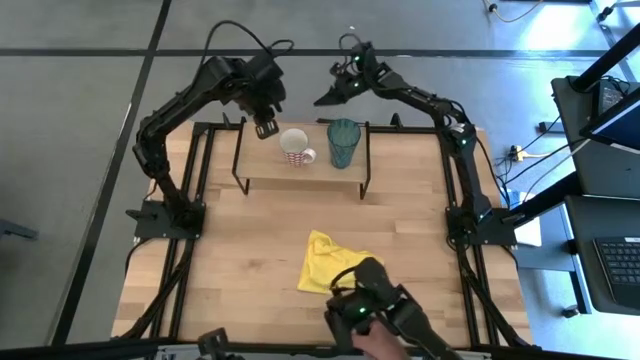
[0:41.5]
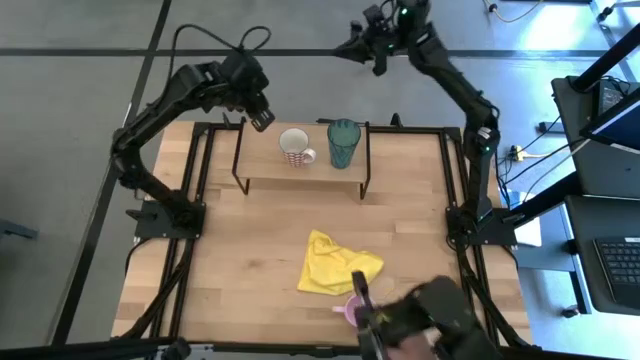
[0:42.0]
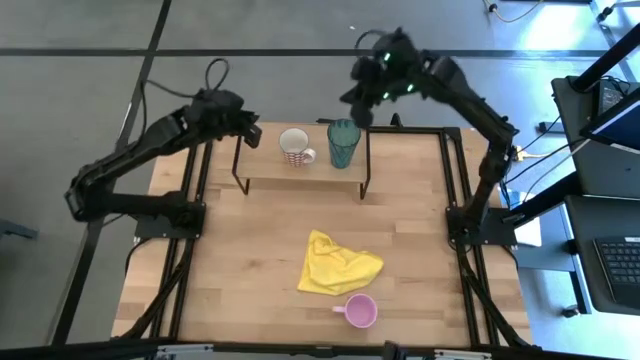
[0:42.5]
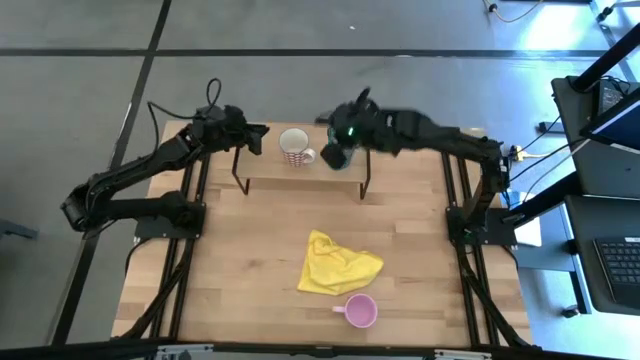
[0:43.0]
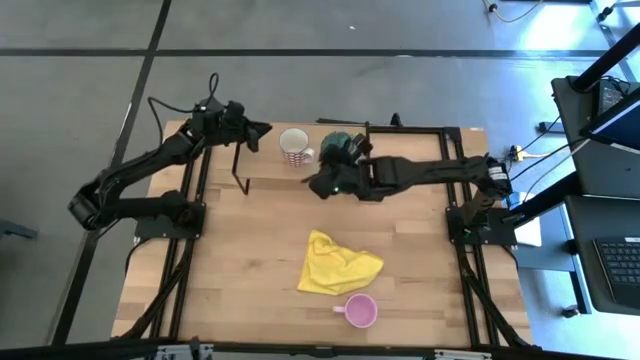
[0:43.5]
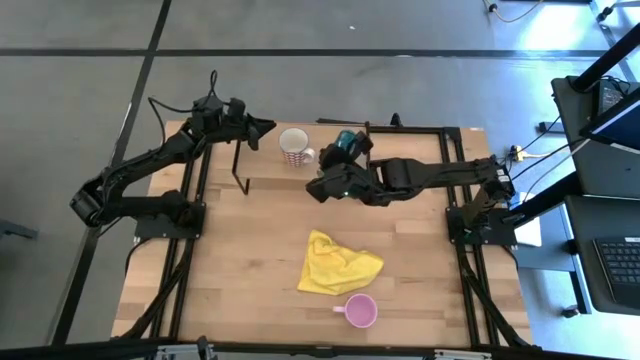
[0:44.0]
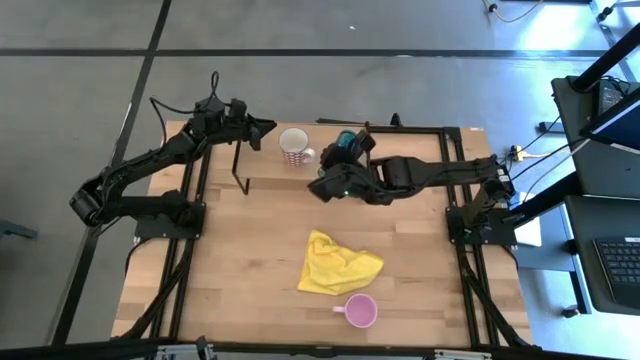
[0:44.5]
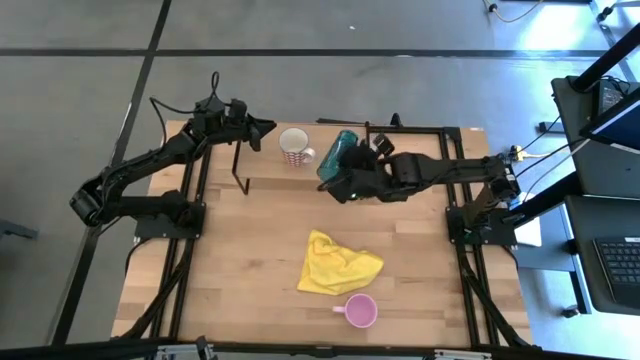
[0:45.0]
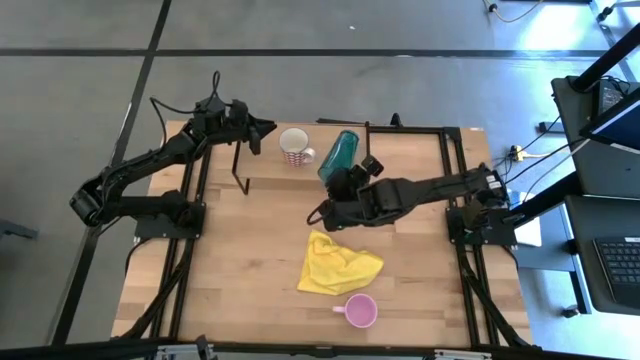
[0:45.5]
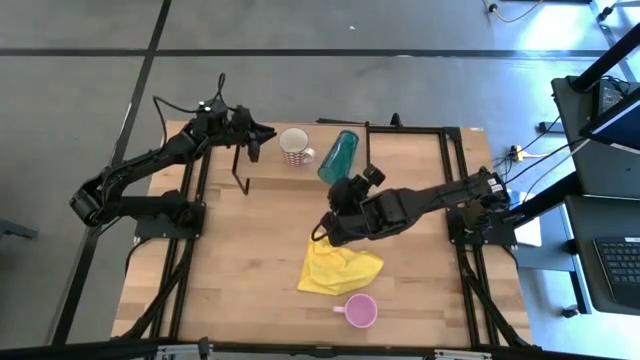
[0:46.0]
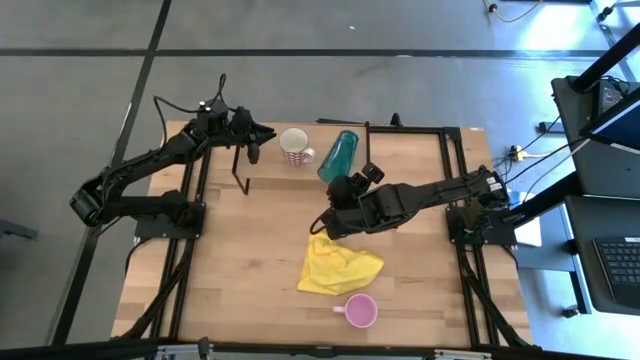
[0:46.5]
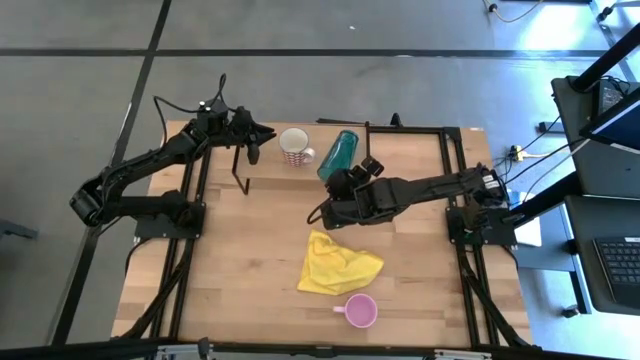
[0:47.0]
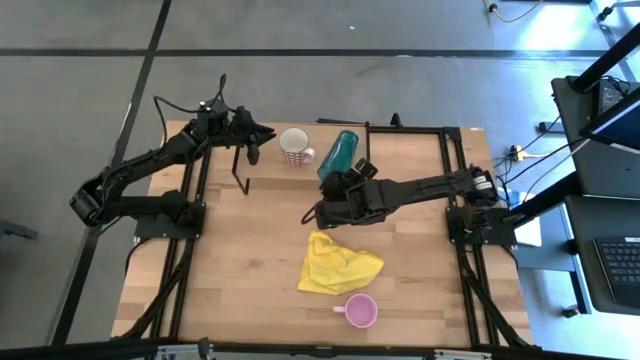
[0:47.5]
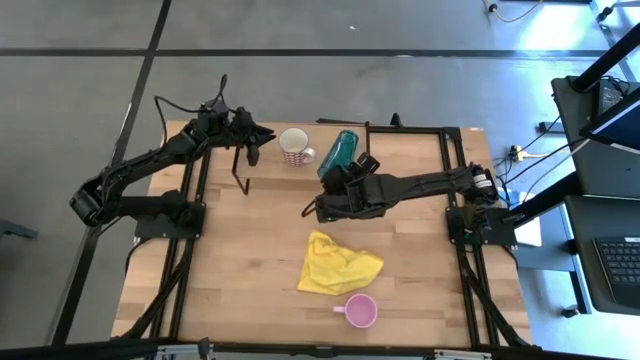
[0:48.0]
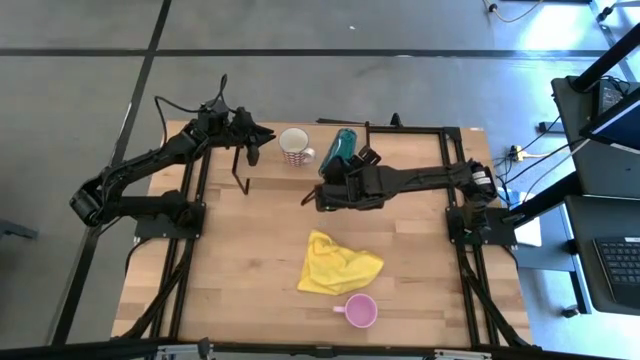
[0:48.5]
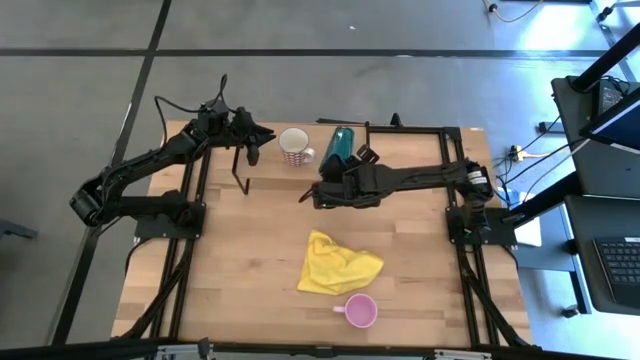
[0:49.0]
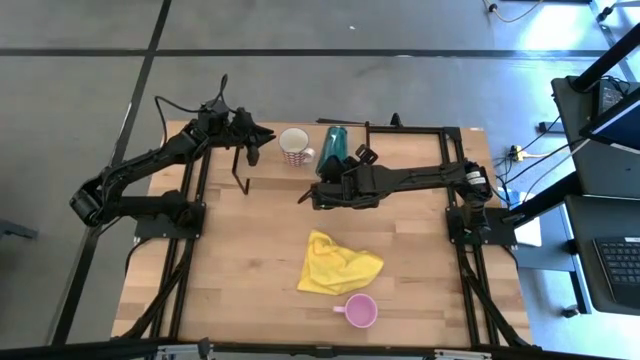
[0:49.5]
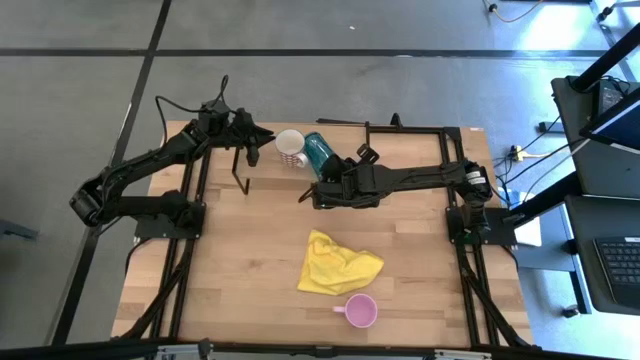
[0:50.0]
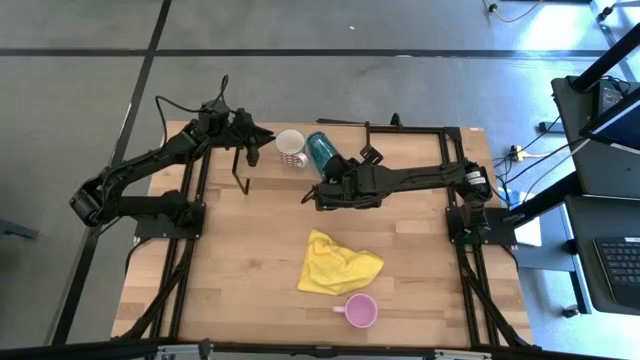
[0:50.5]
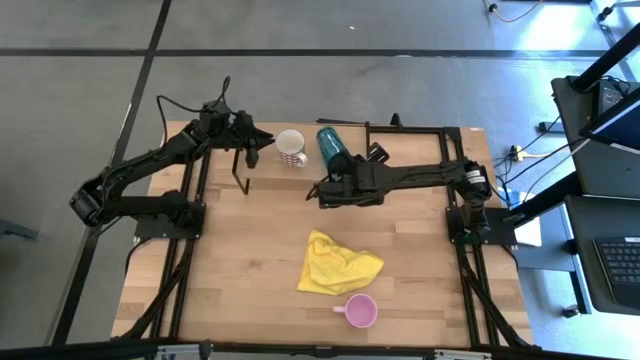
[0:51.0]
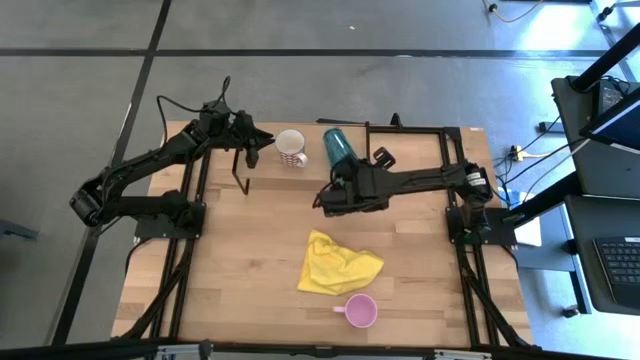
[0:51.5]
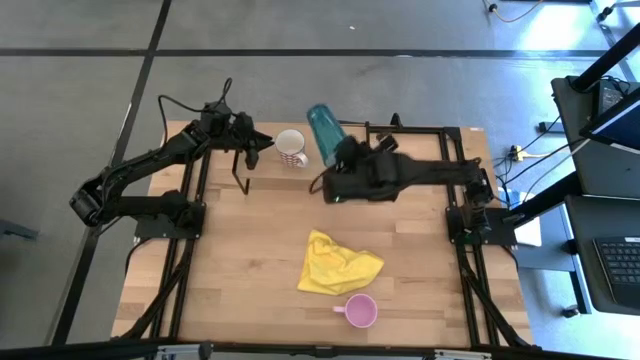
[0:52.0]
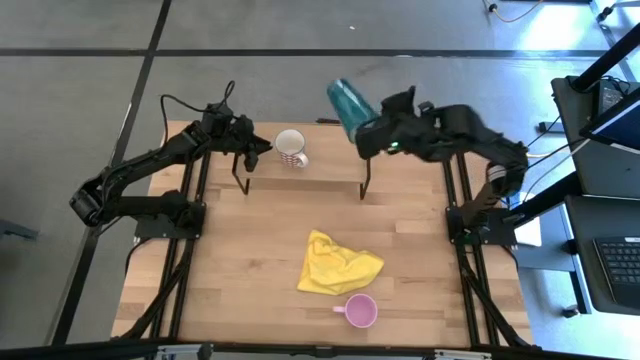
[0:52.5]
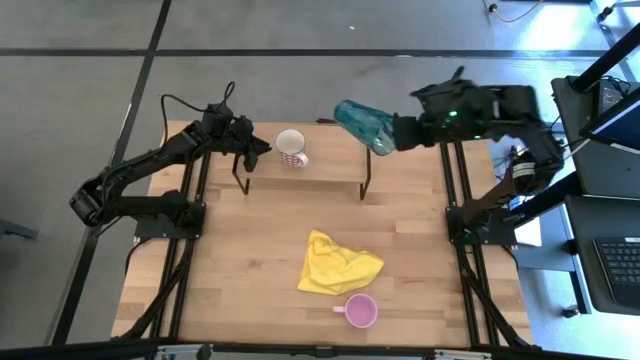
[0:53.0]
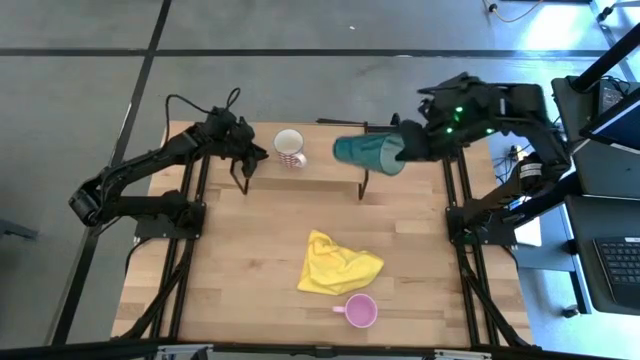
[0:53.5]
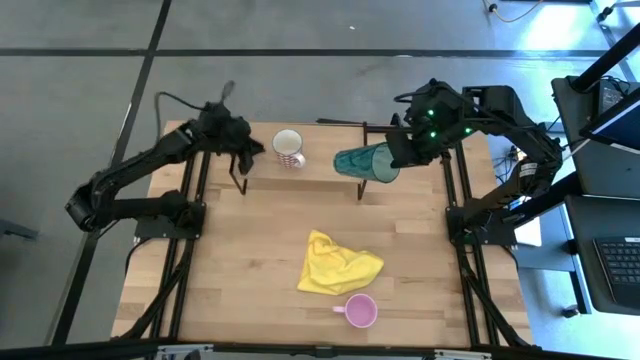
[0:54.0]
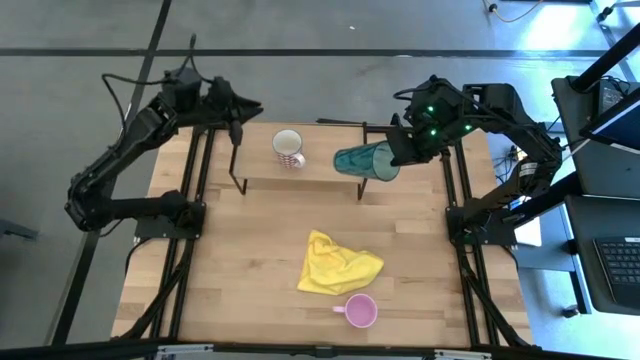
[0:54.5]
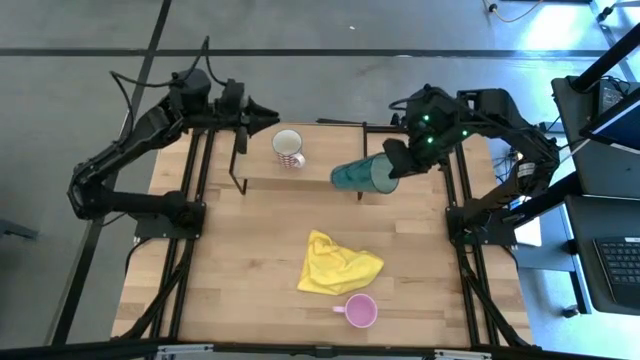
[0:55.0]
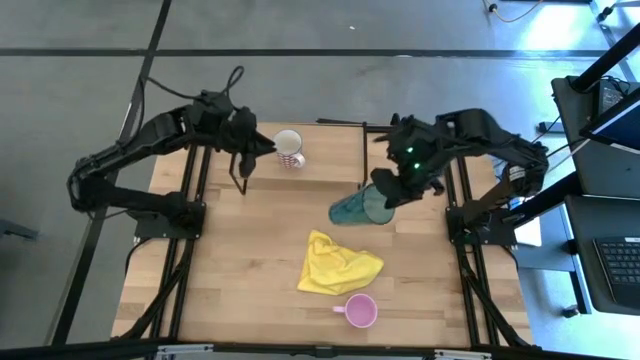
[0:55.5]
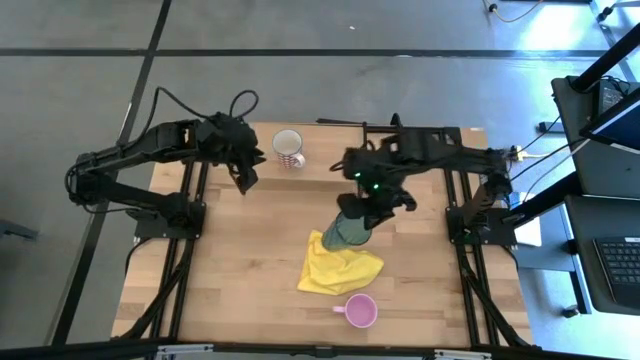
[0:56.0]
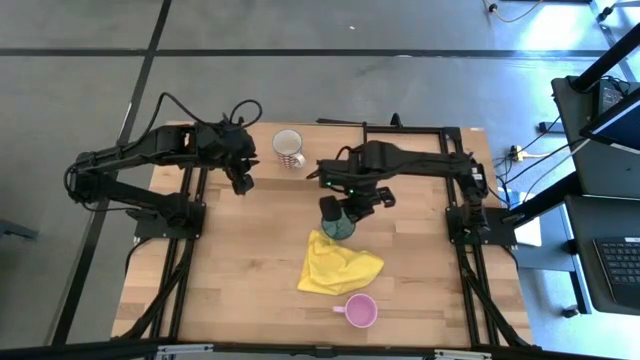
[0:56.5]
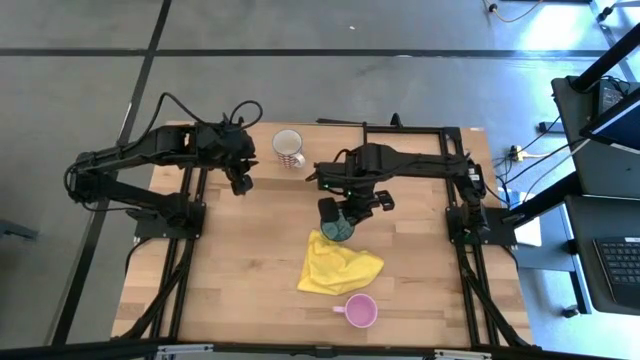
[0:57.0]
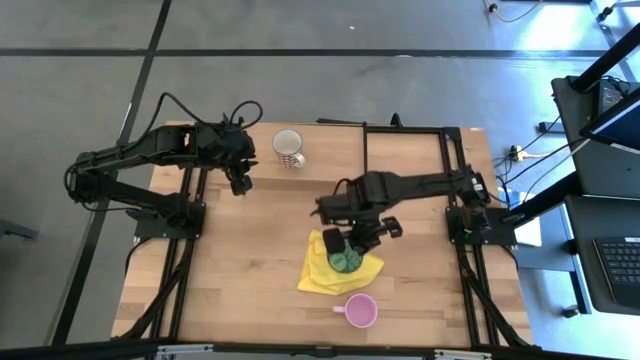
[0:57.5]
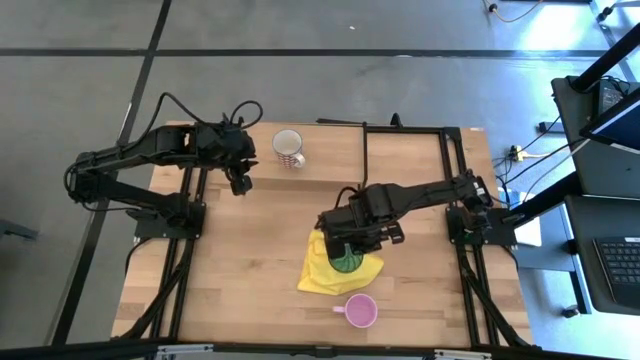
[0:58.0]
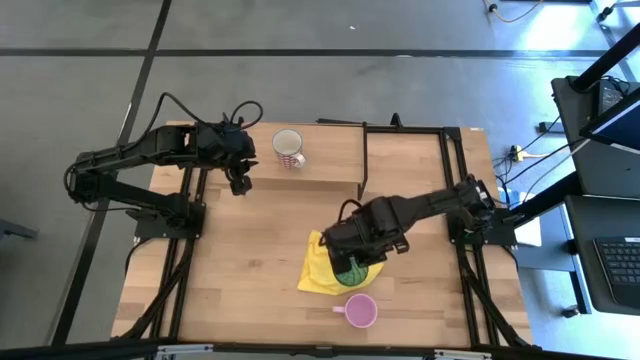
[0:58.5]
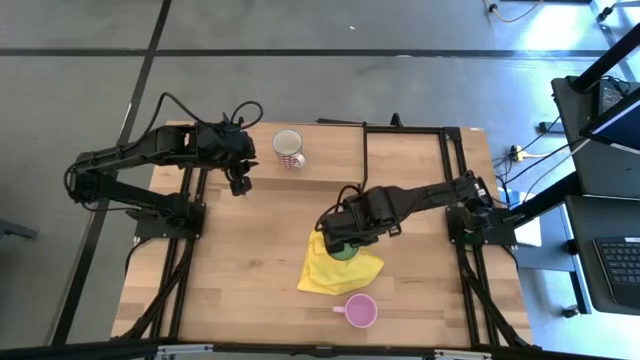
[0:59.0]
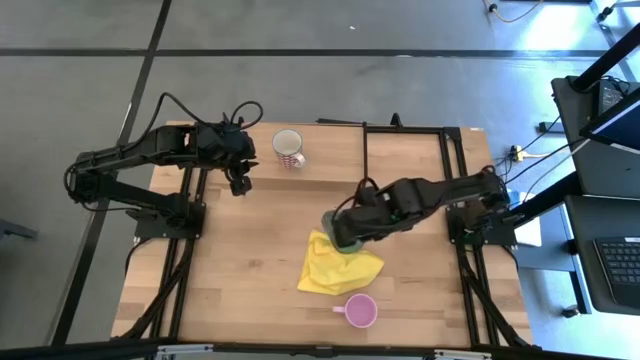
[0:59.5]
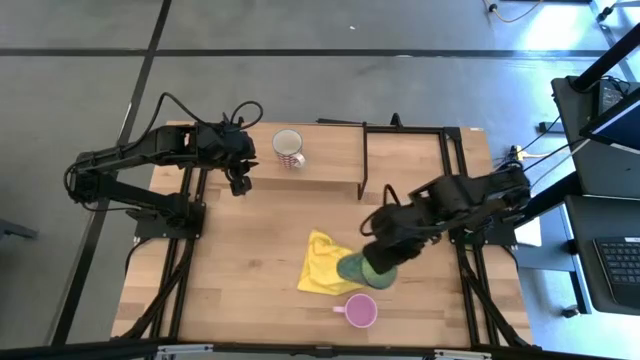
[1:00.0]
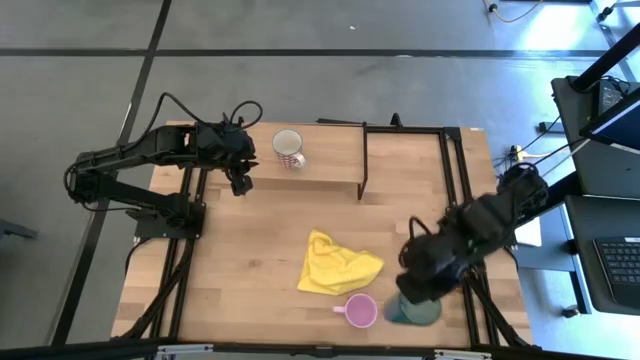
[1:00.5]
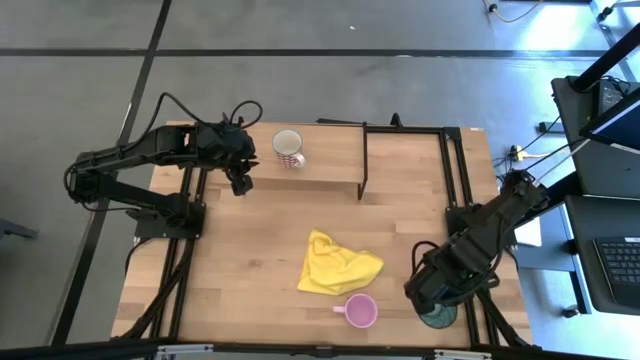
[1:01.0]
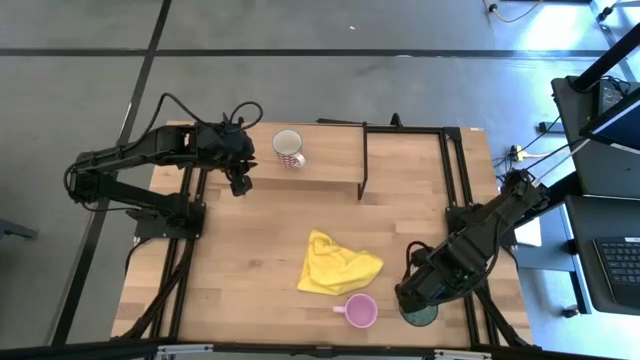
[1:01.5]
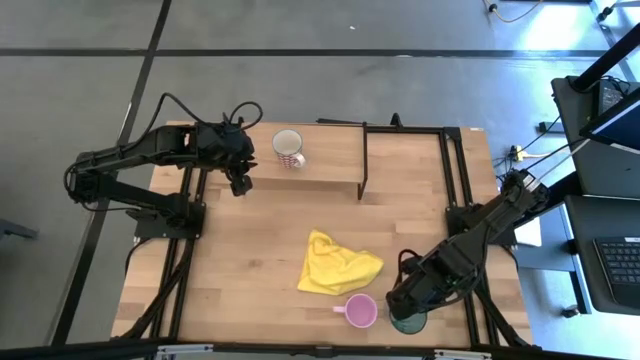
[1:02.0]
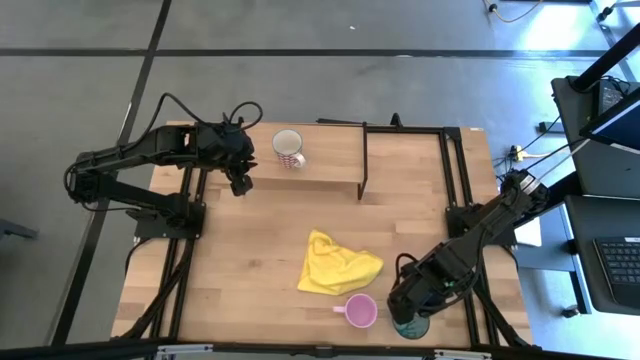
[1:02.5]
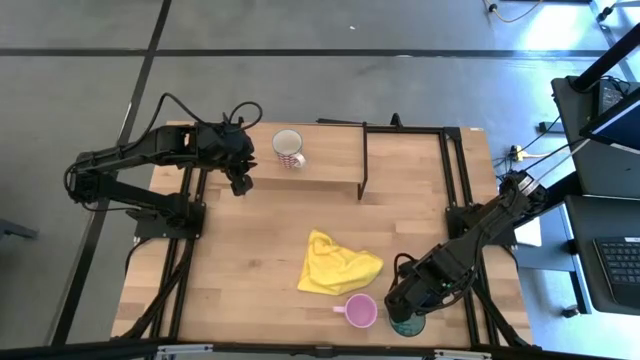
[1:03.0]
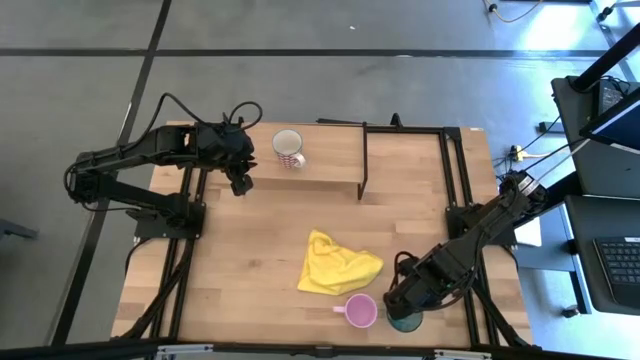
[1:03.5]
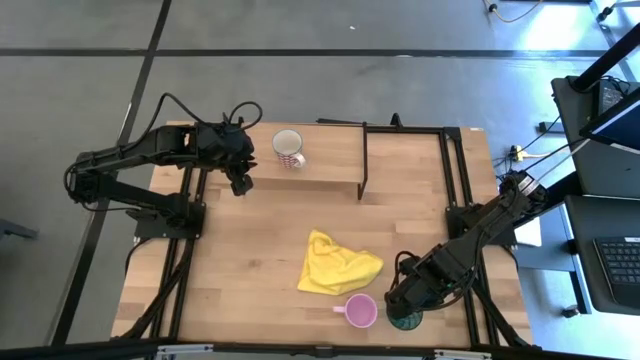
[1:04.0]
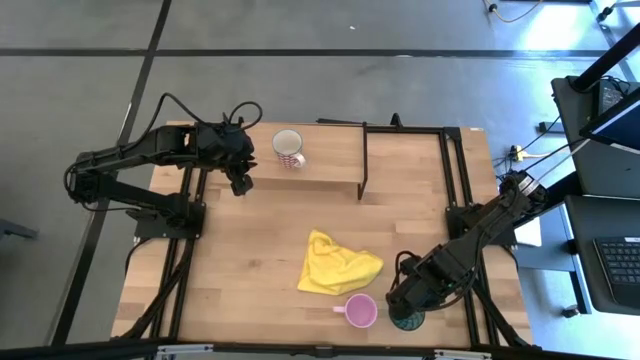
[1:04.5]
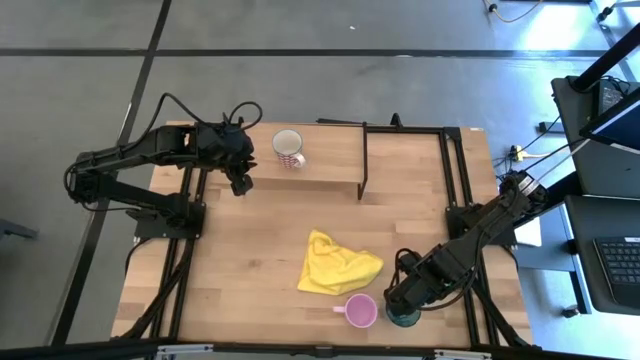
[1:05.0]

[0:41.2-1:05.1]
Task: Stack small to large cups/mugs on shelf
Remove the blue cup from the shelf
